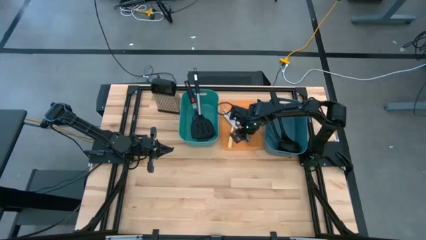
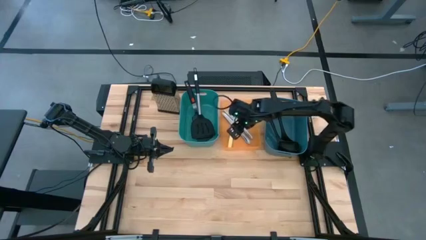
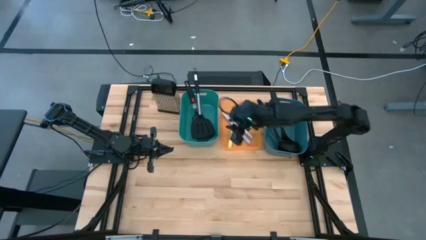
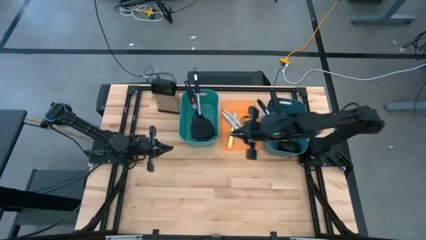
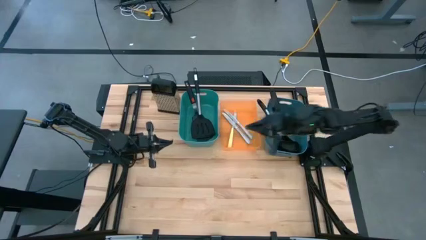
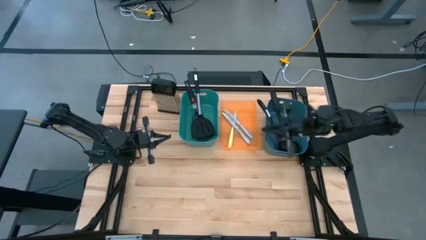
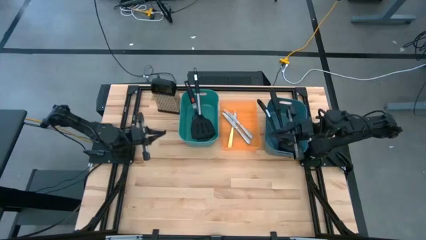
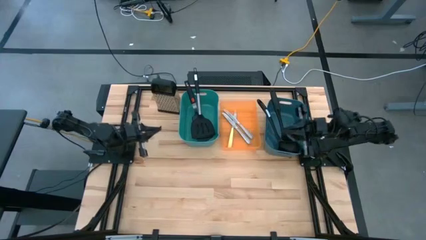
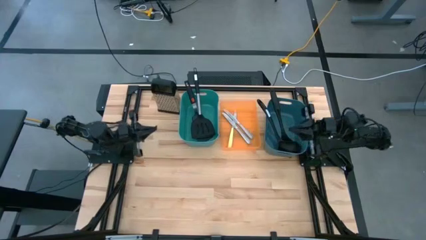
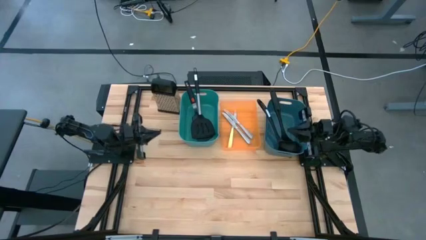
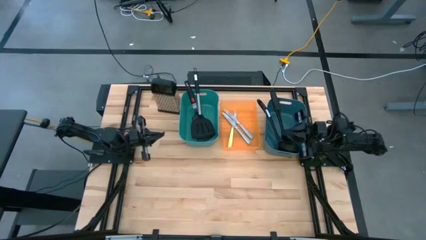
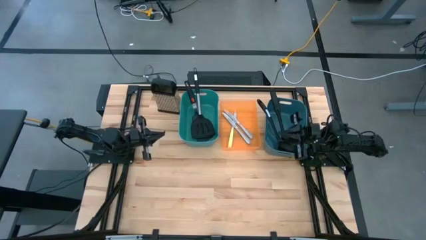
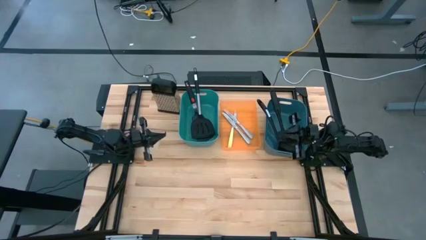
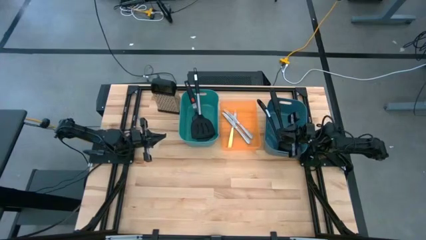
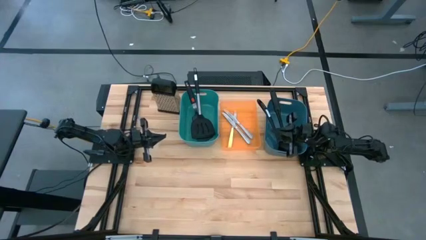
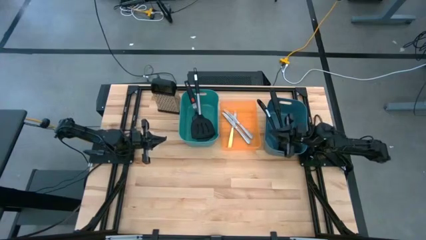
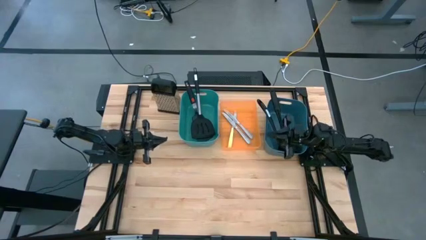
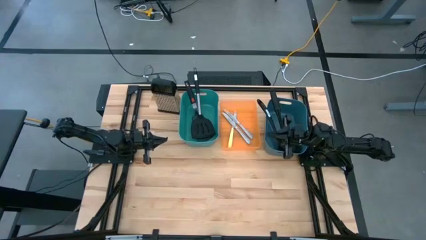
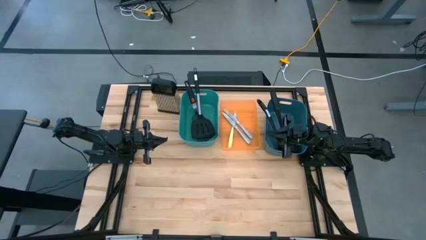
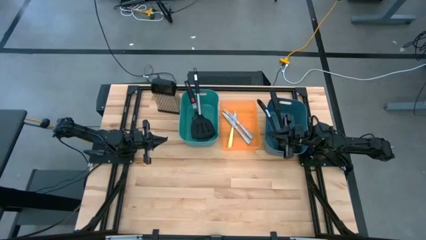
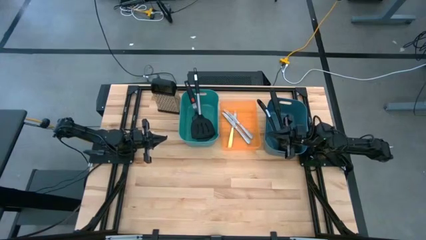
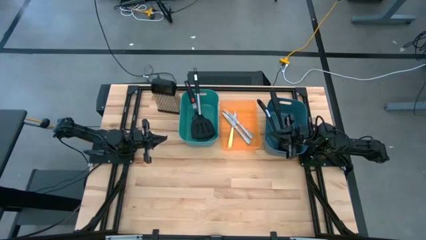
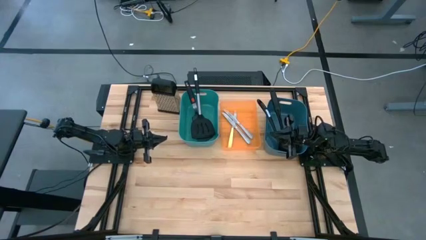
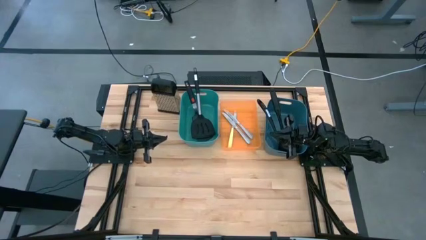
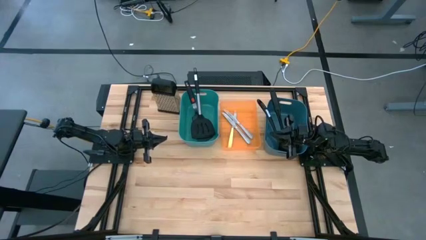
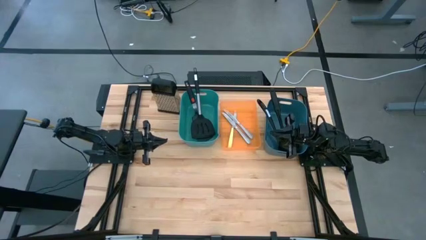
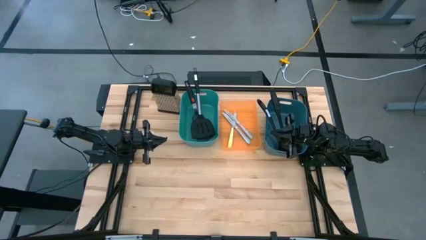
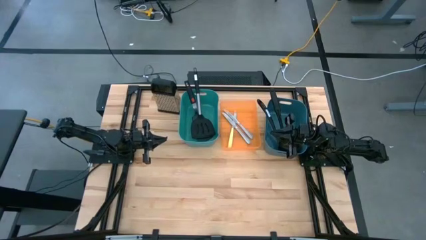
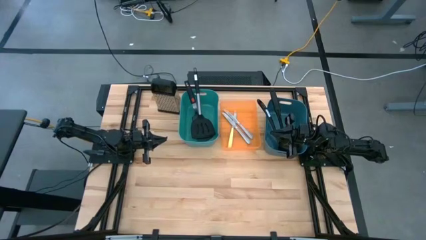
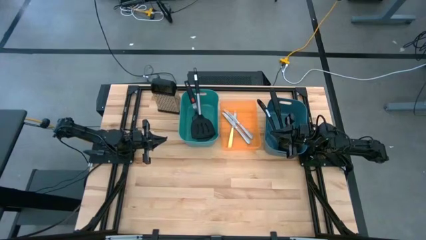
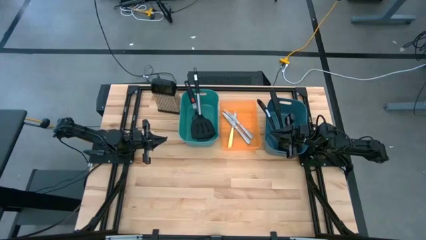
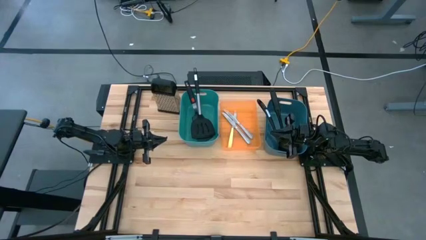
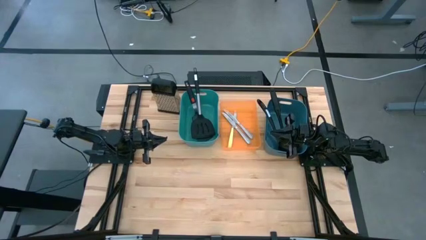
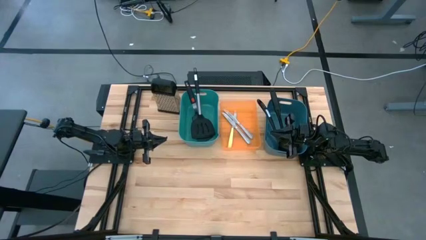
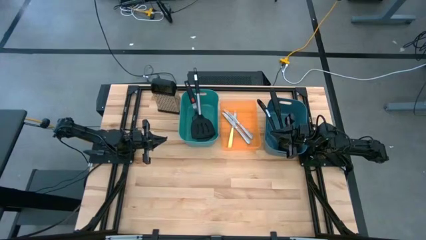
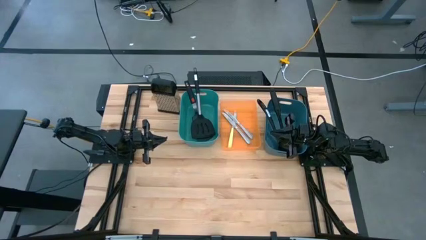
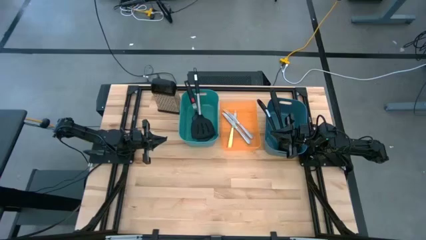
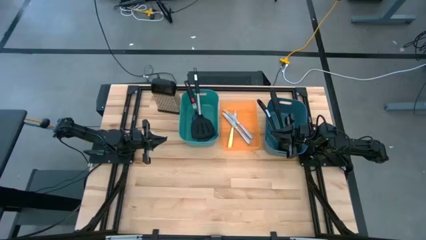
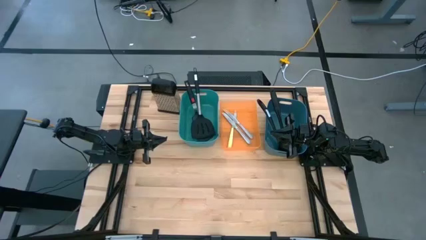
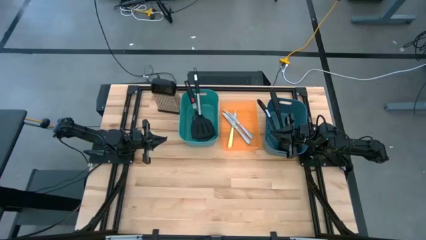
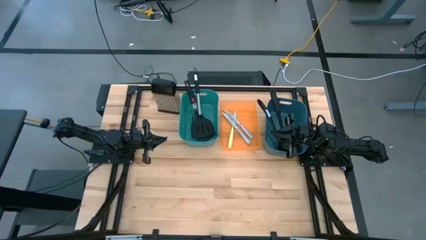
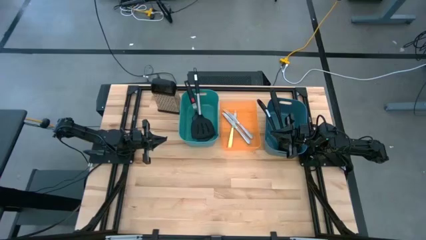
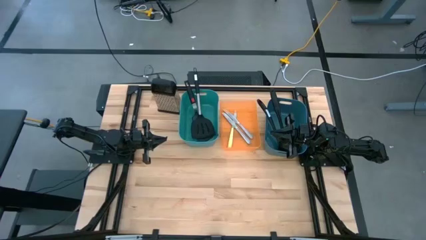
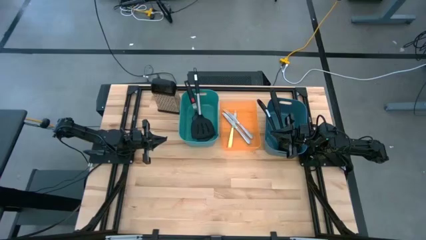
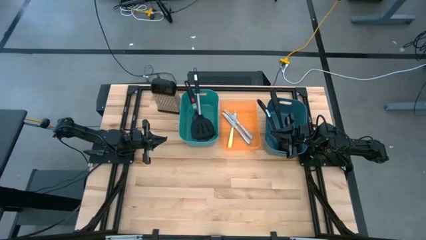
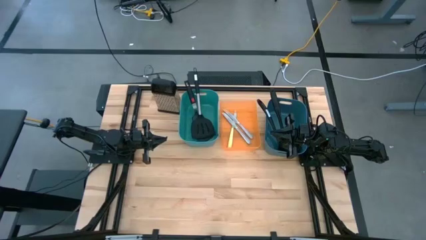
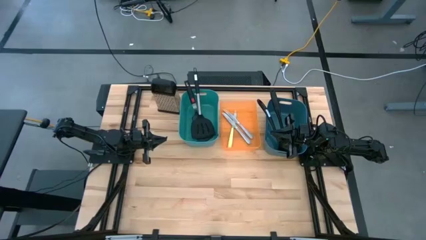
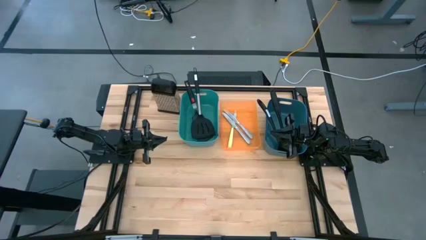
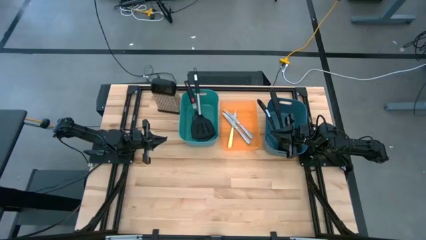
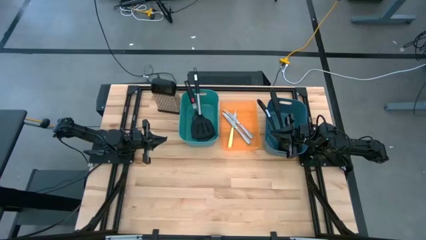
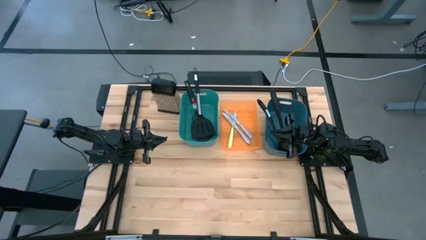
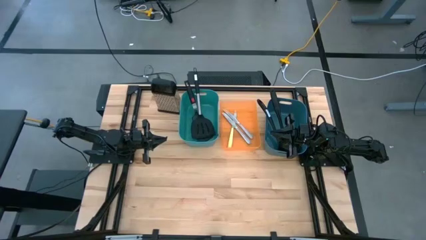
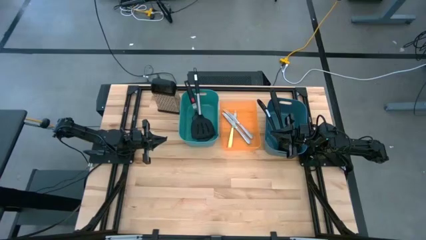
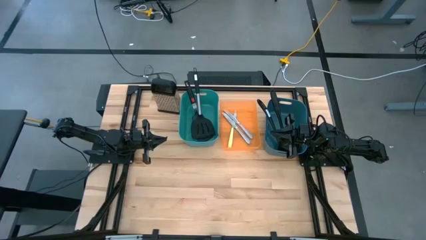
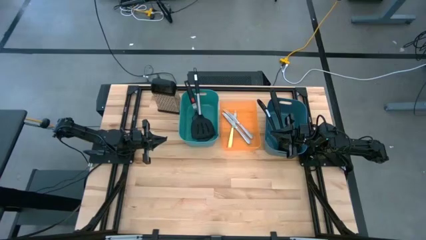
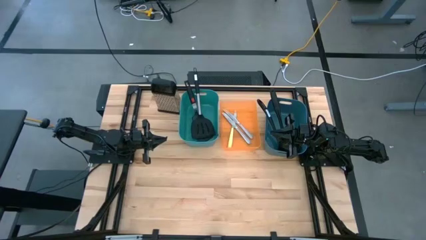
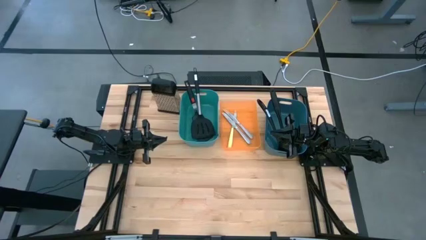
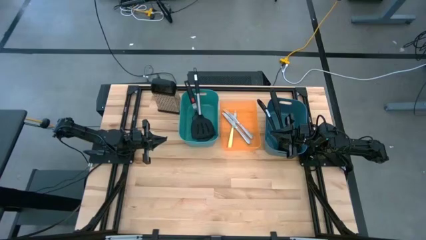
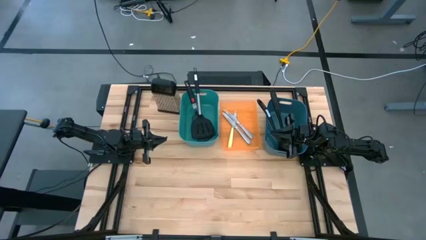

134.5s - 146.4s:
Task: Pick & Place Kitchen Items
Return to Home Position

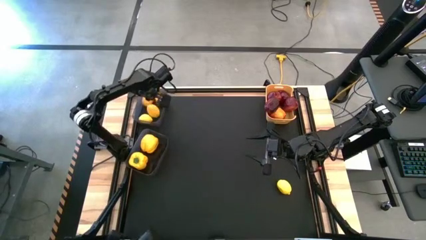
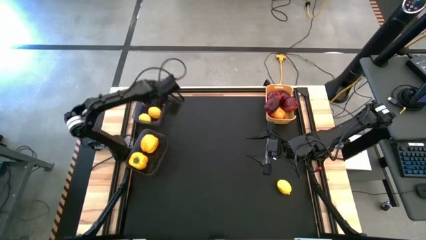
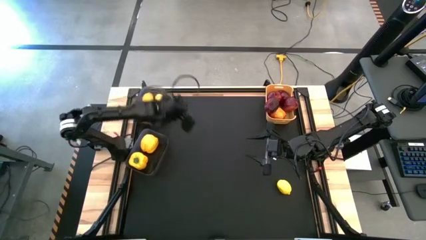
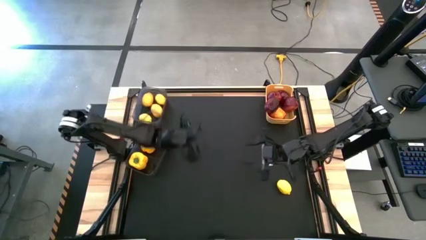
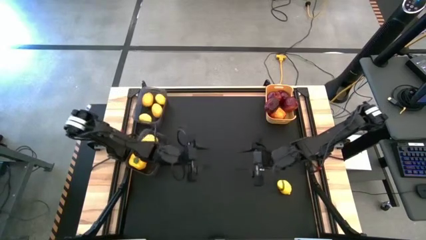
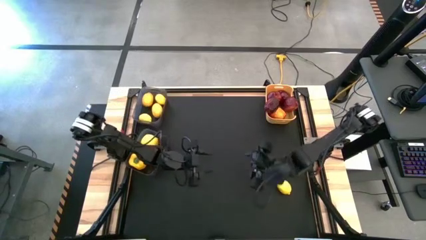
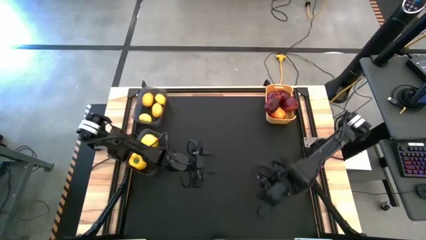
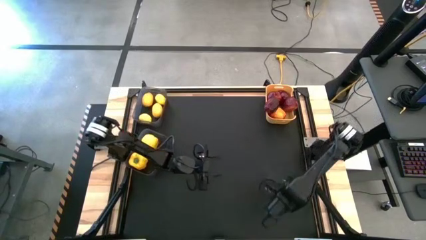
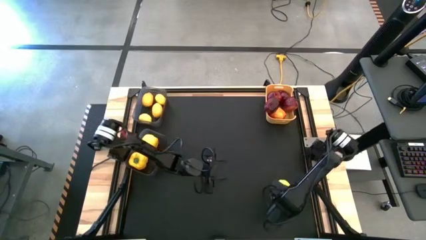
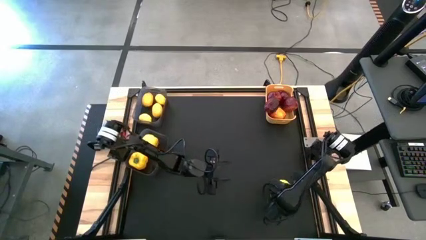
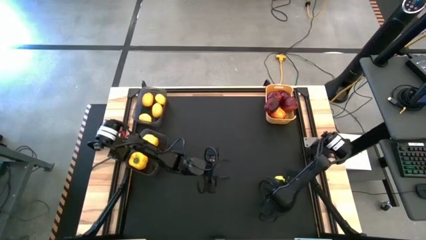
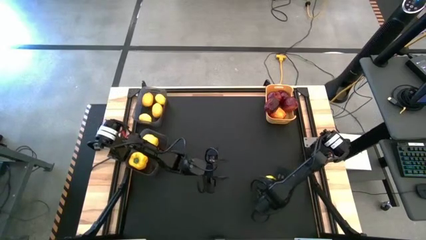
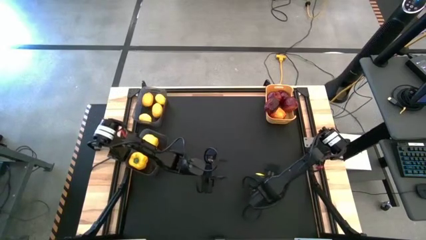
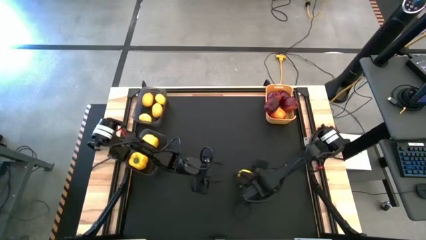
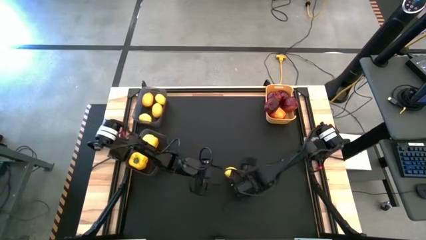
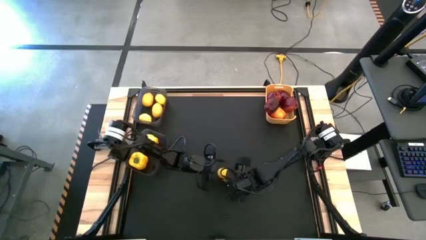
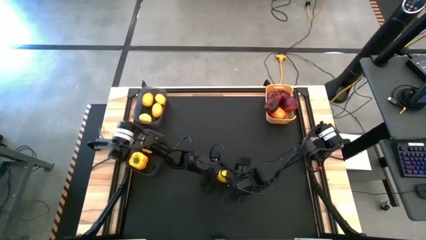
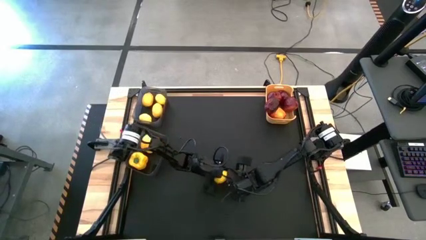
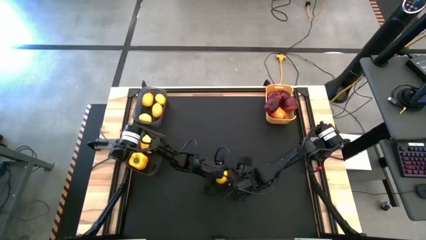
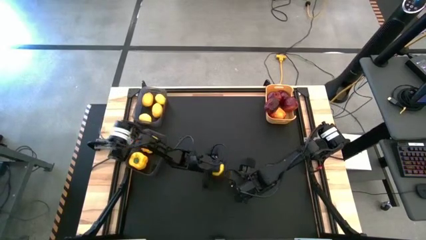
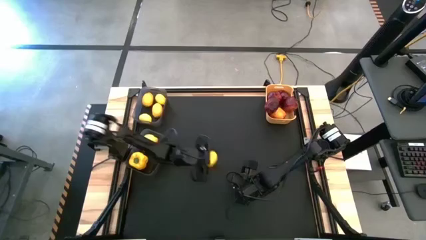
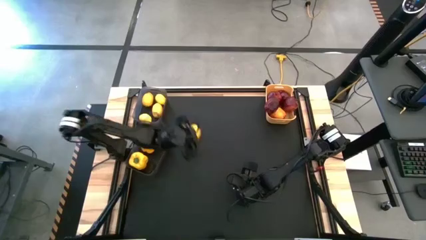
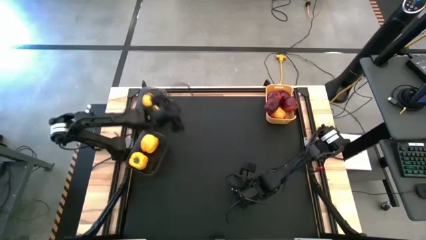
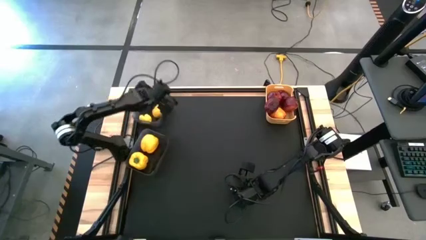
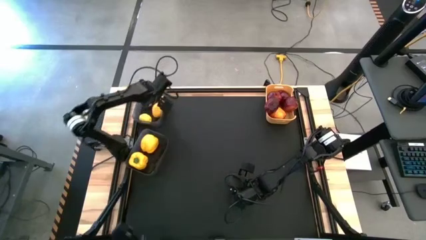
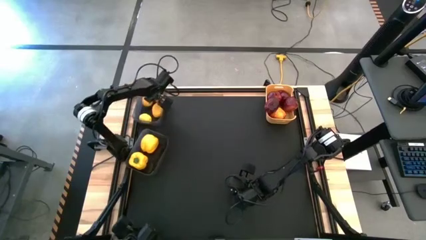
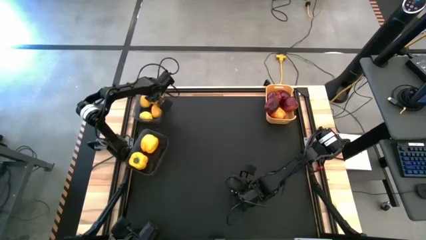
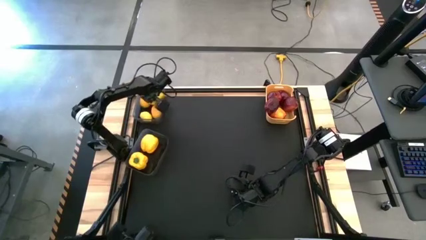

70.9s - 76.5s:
Task: Sort produce into baskets
Put the lemon into the top black bin
